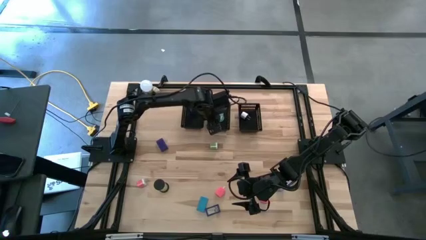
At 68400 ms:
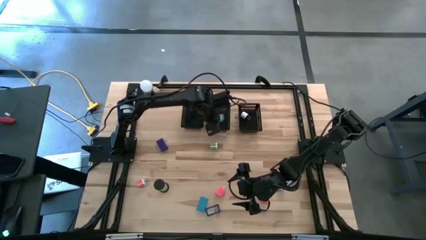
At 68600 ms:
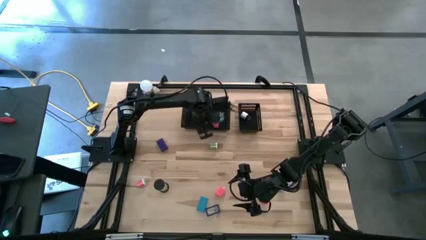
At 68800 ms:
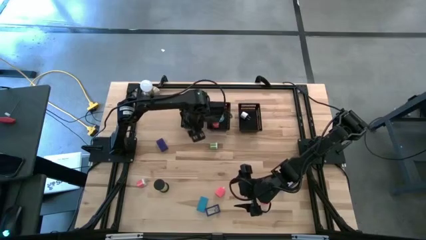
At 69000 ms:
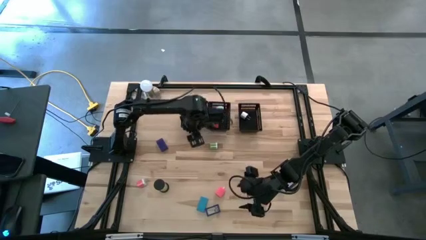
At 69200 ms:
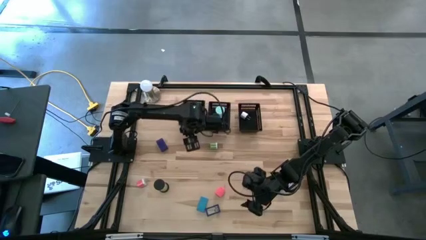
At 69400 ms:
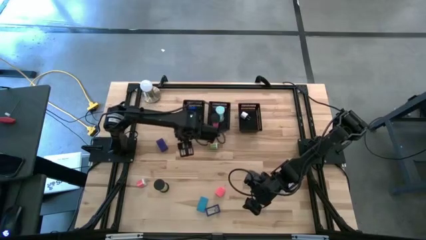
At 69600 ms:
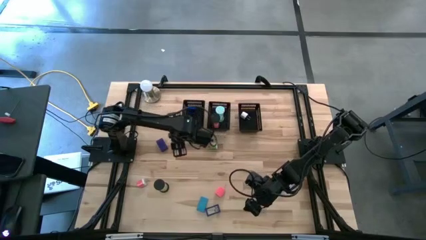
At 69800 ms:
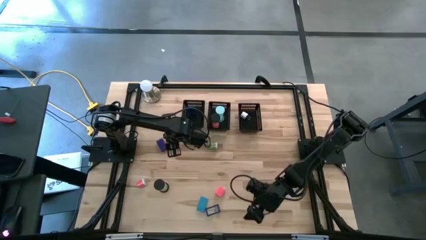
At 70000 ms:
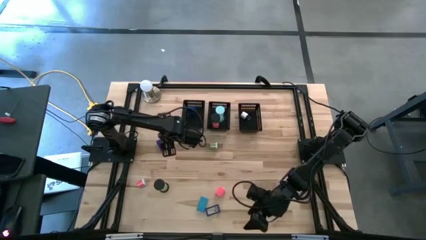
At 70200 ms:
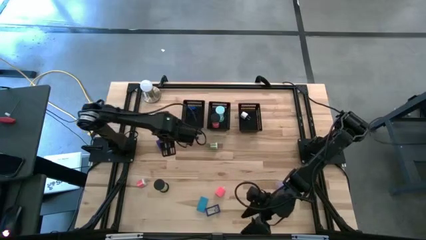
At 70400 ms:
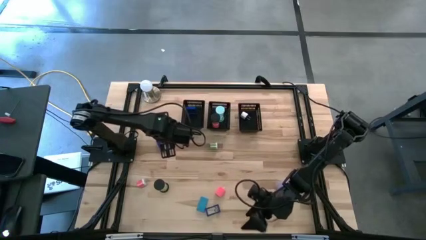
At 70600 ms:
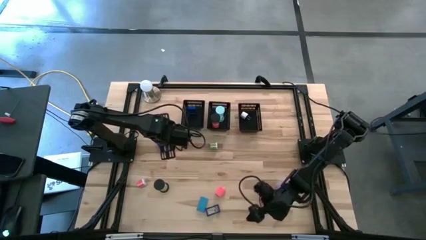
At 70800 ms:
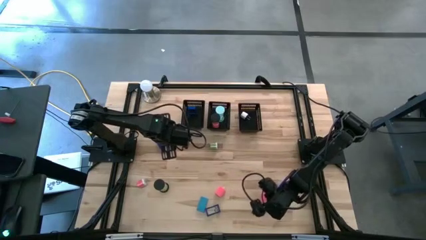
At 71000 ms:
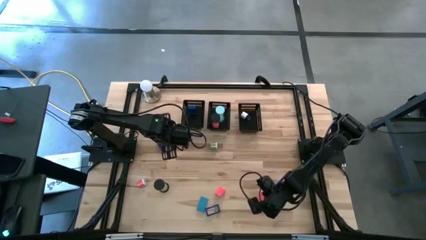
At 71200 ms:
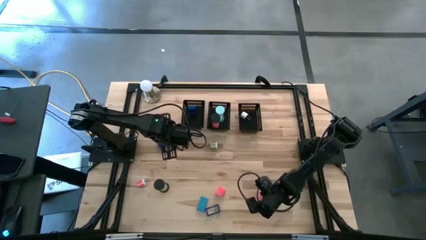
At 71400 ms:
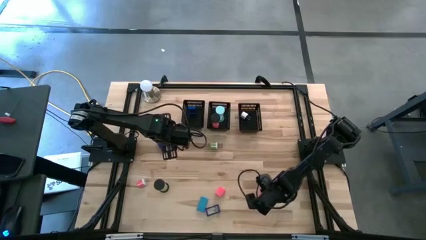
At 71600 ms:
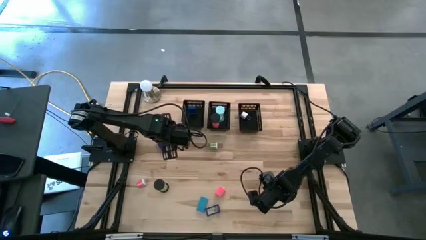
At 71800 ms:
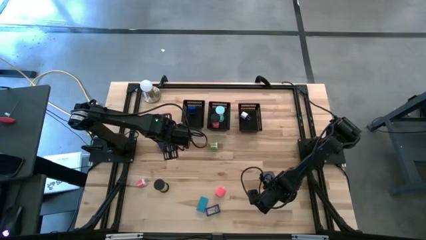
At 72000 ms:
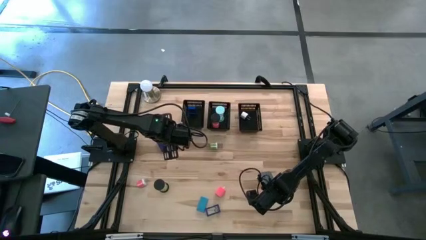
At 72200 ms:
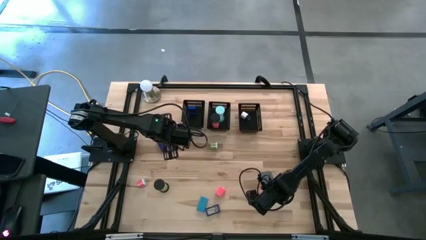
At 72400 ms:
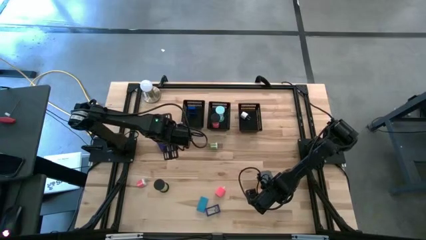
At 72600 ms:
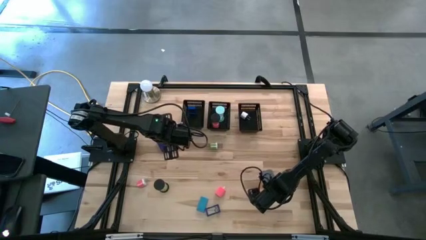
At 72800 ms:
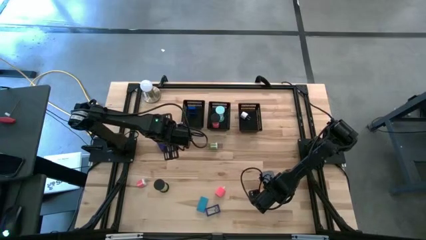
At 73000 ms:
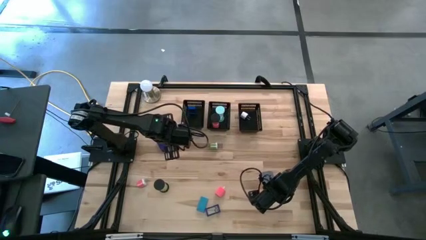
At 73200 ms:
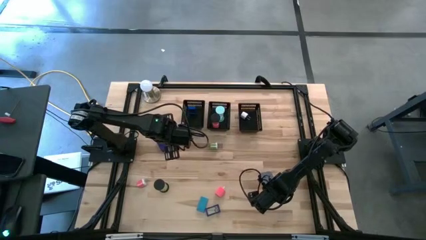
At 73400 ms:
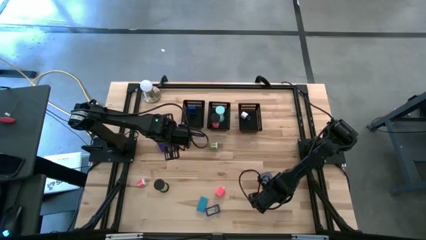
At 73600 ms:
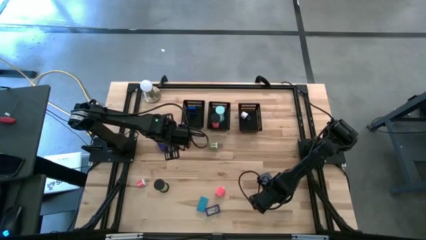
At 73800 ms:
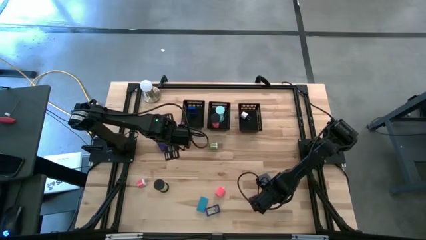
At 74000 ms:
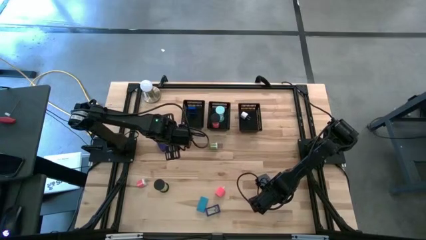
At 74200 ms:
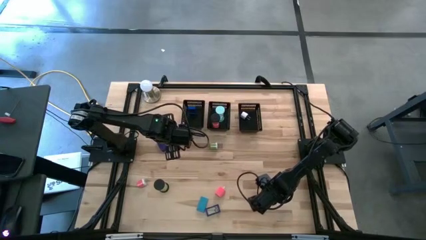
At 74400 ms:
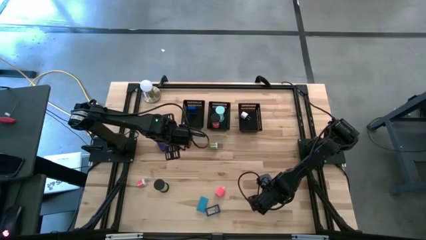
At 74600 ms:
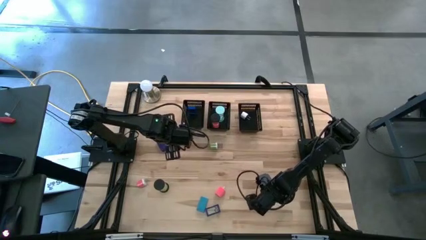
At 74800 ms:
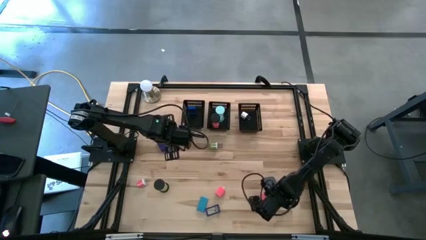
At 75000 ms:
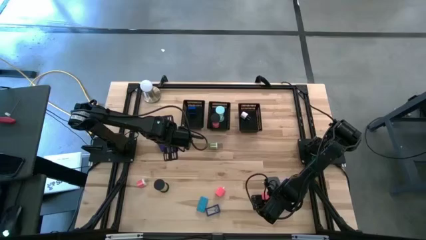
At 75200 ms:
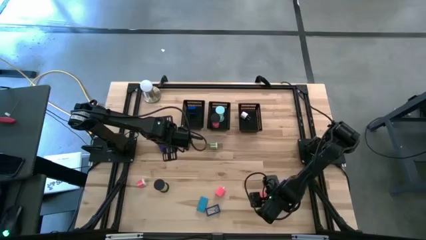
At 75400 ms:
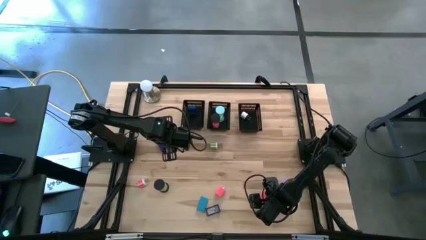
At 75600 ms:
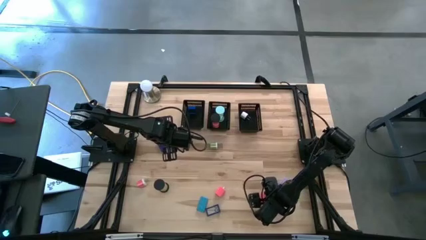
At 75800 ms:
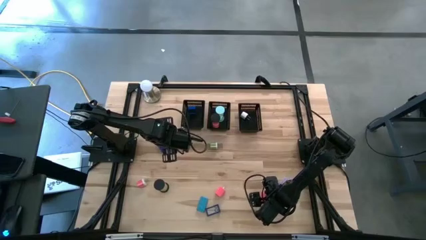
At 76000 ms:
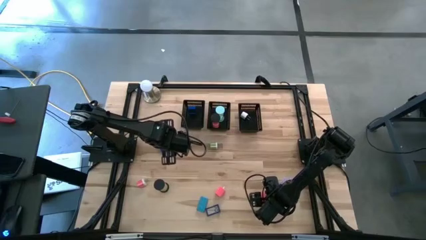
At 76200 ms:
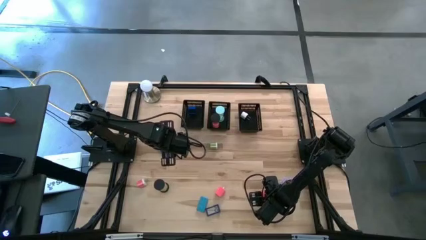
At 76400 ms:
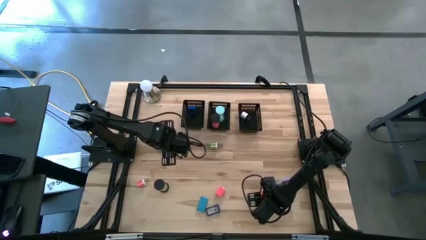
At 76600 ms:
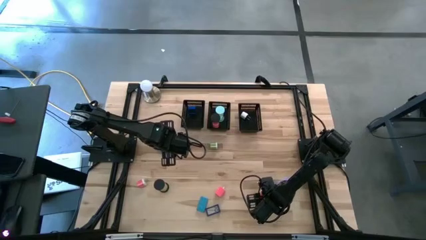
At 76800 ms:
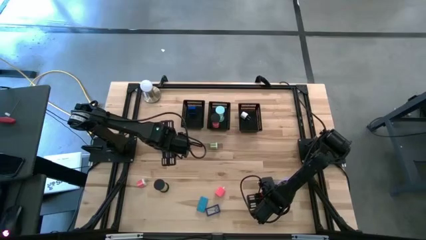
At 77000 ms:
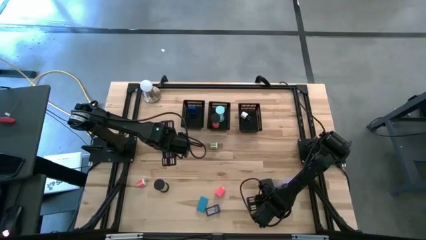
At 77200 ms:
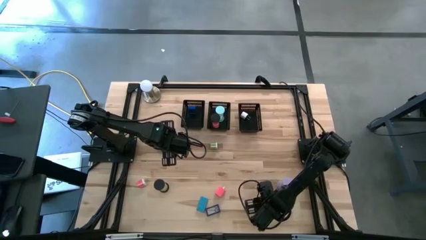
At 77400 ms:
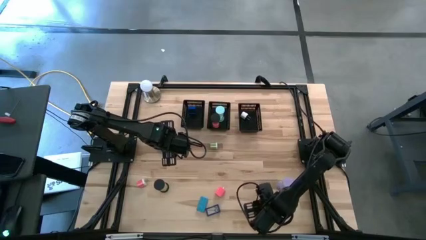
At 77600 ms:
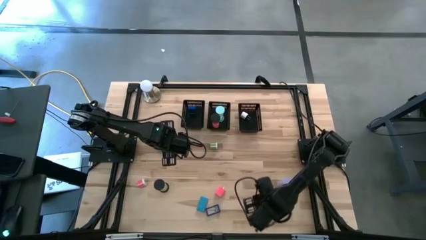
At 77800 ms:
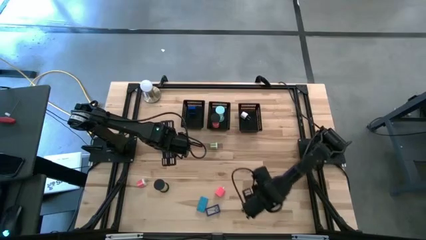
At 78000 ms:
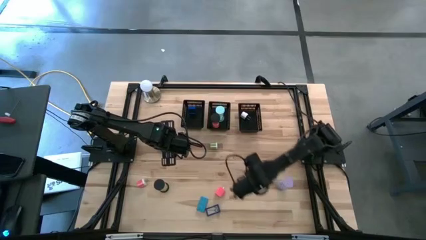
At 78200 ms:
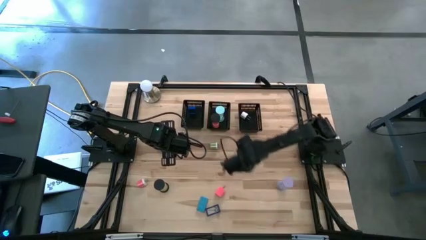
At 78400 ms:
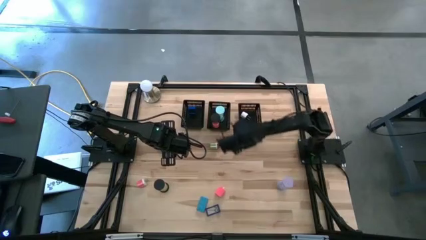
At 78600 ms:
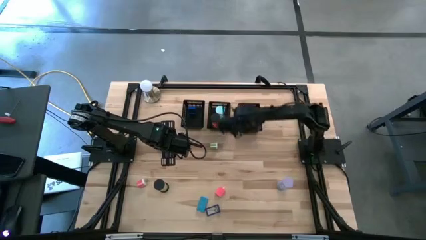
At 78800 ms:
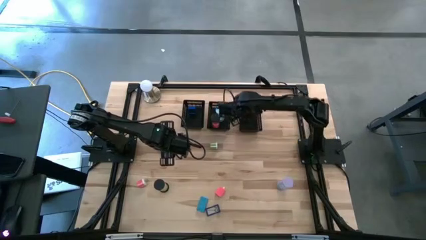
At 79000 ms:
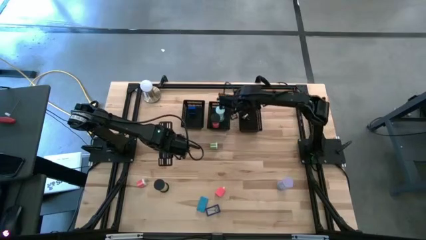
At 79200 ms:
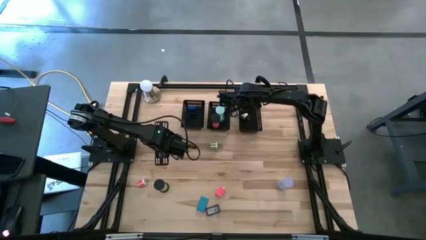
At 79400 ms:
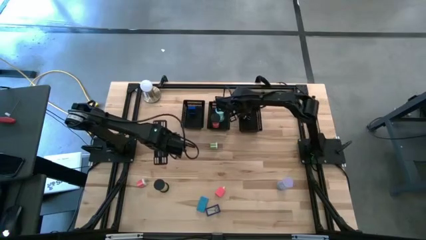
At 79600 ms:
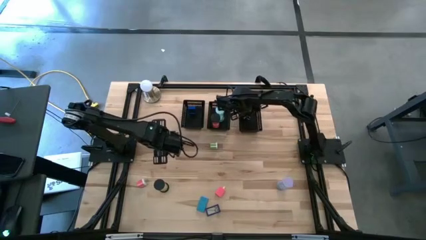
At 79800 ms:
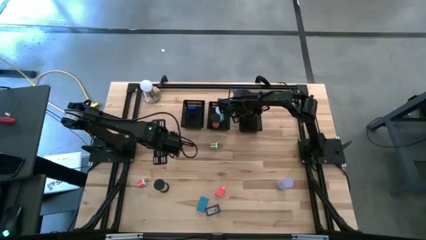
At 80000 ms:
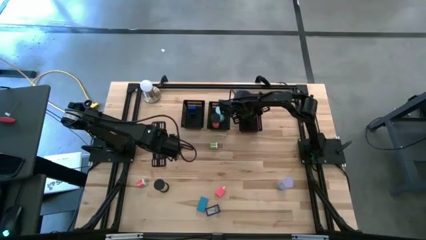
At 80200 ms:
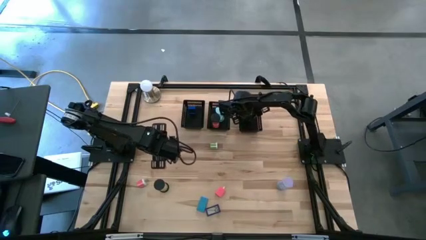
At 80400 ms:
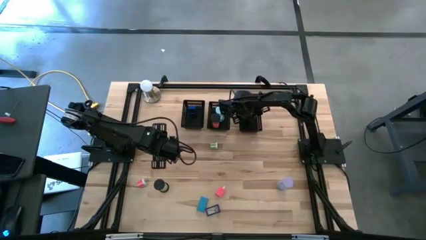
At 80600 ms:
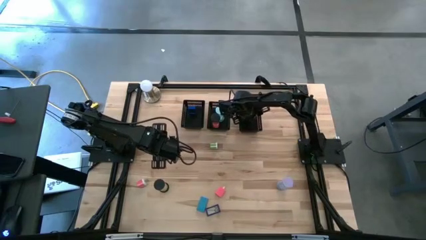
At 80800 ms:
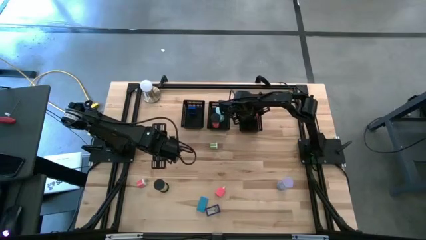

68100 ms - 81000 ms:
Task: Pick & Place Office items
Put the right pink charger charger adapter into the right black bin

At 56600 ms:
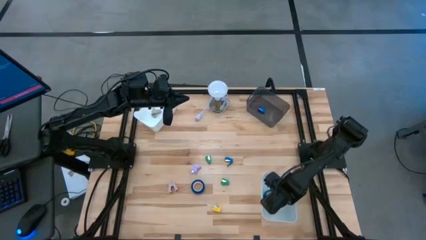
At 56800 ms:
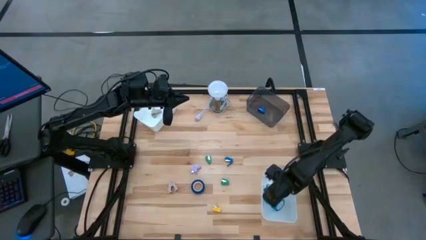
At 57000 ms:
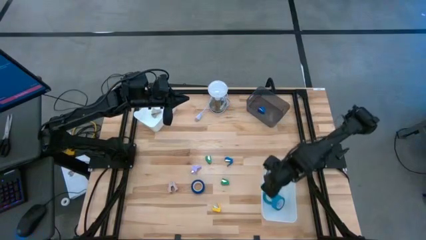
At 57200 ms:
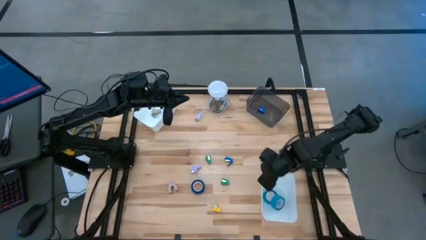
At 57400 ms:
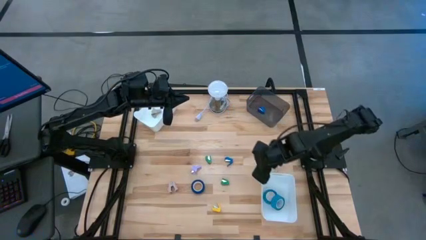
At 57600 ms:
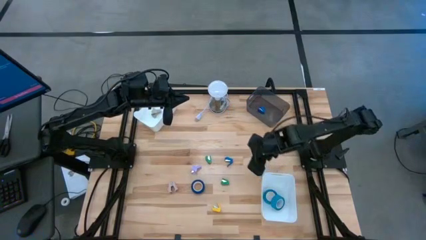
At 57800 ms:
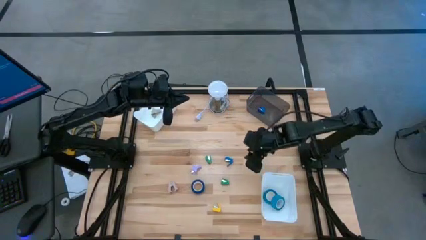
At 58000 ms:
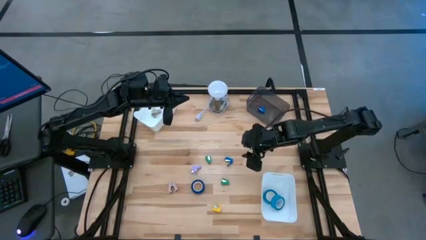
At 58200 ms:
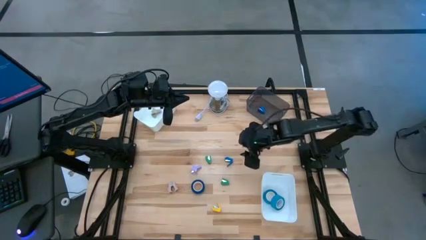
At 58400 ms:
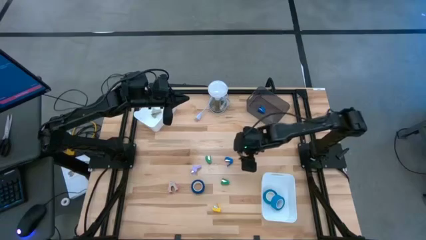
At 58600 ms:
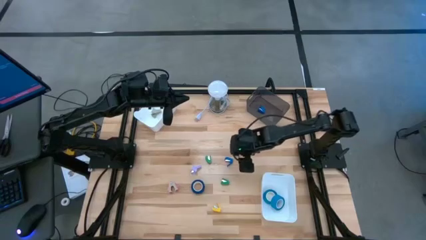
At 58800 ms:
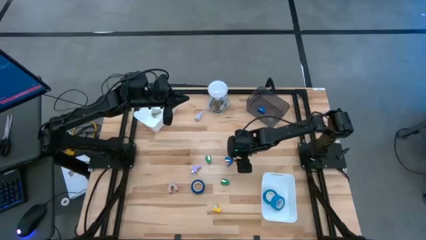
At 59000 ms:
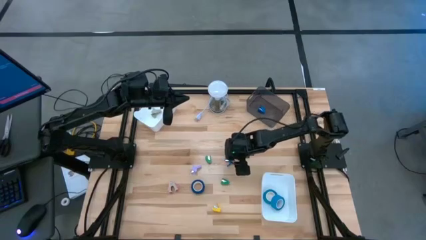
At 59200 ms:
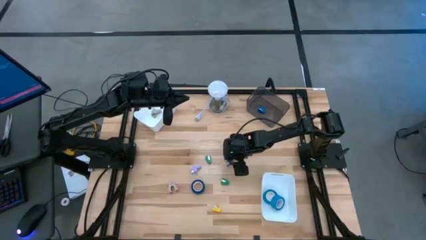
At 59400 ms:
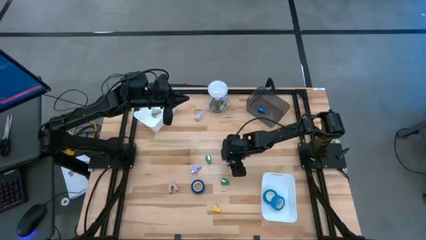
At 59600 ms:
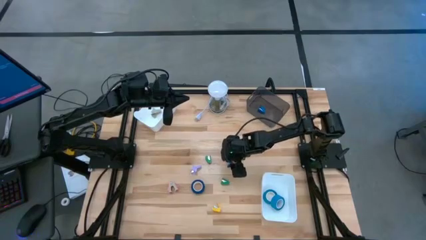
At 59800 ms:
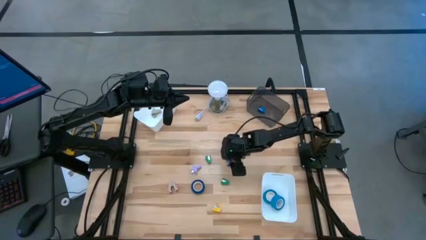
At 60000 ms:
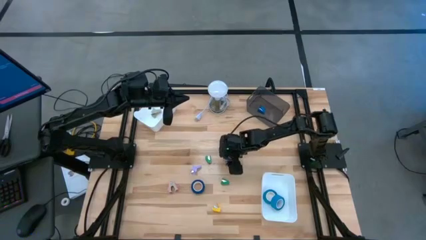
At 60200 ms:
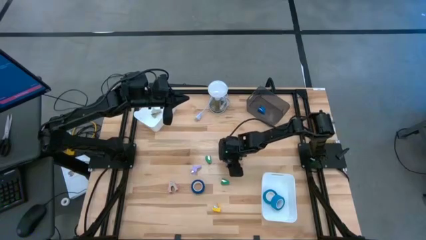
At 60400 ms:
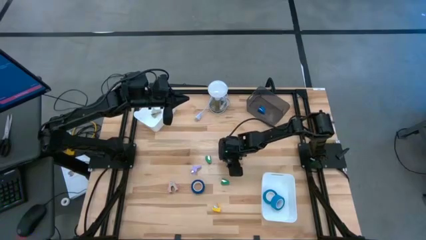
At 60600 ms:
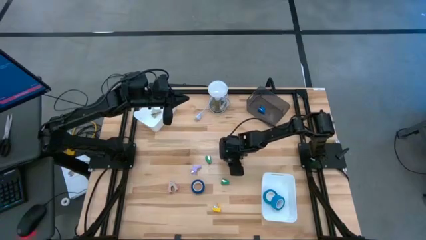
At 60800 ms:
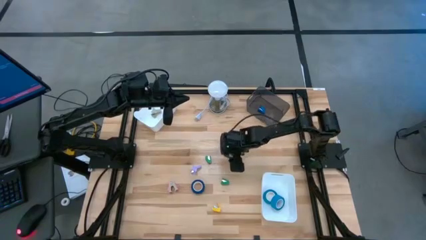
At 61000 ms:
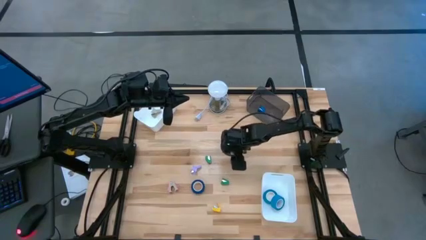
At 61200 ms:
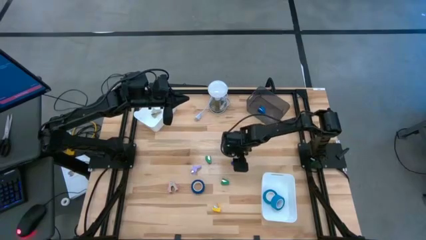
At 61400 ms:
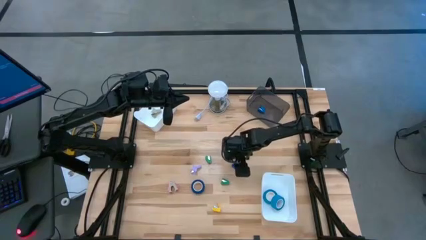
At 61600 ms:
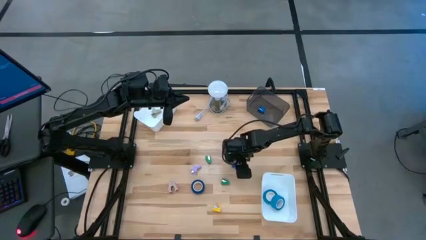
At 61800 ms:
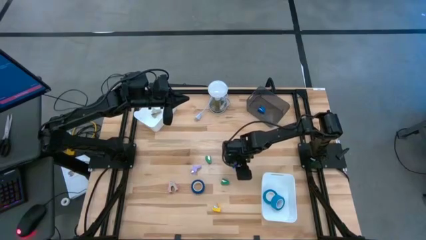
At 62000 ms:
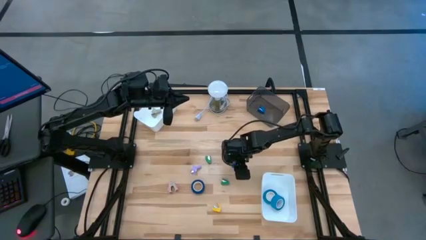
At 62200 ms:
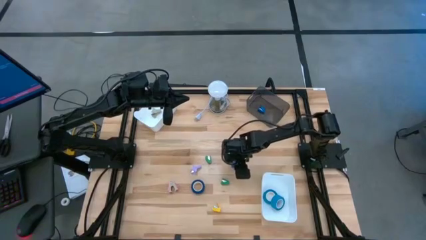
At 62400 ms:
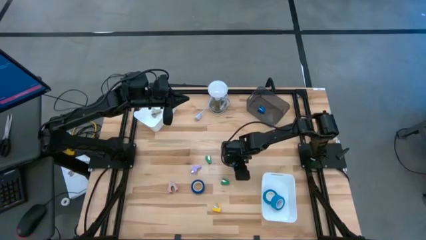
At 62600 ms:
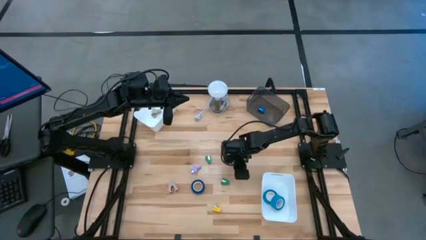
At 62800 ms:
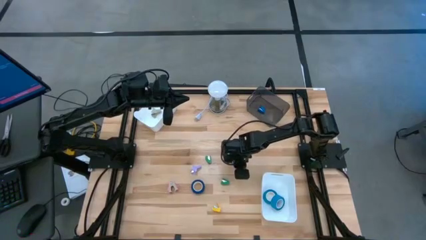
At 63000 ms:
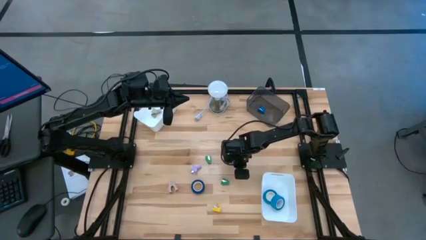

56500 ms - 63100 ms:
Task: Pick and place Stapler, Stapler remover, tape
Put the blue stapler into the black bin
